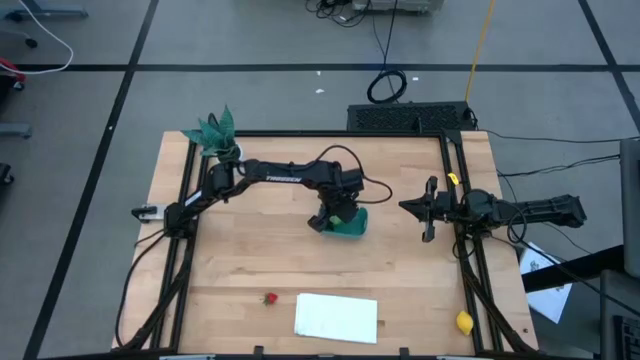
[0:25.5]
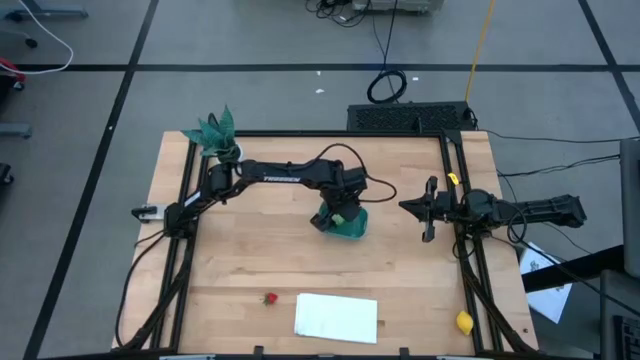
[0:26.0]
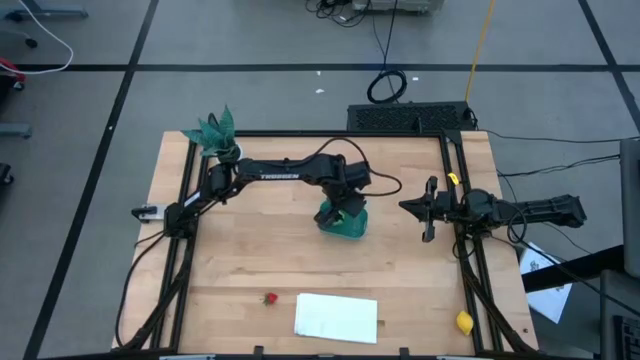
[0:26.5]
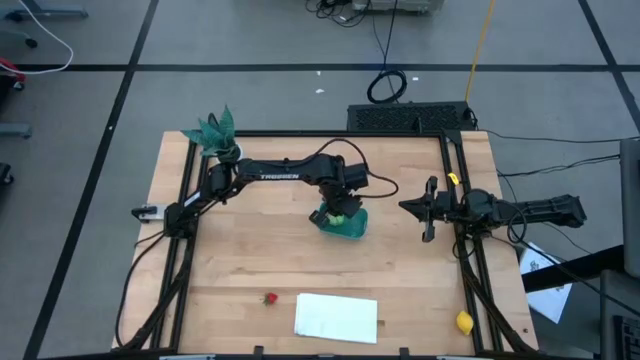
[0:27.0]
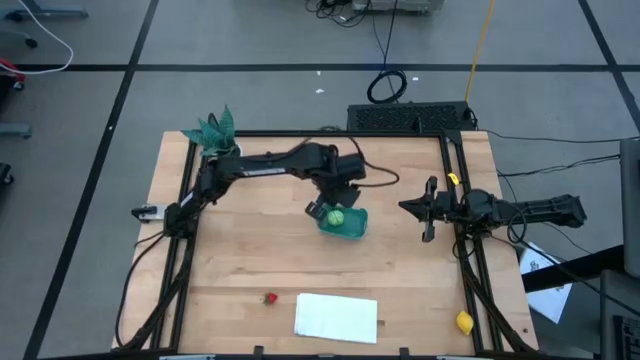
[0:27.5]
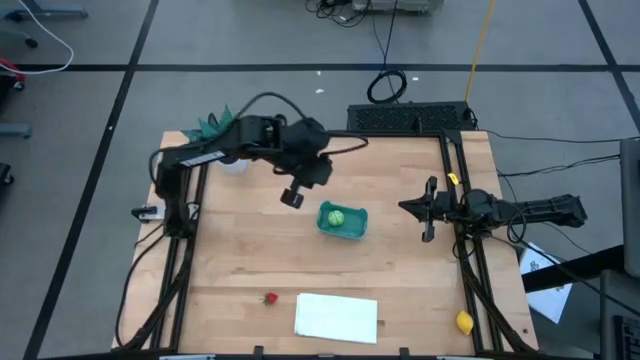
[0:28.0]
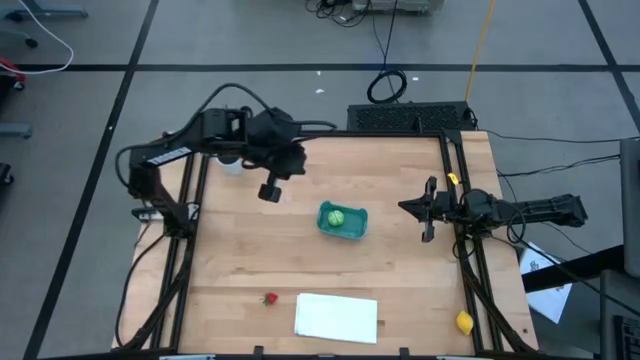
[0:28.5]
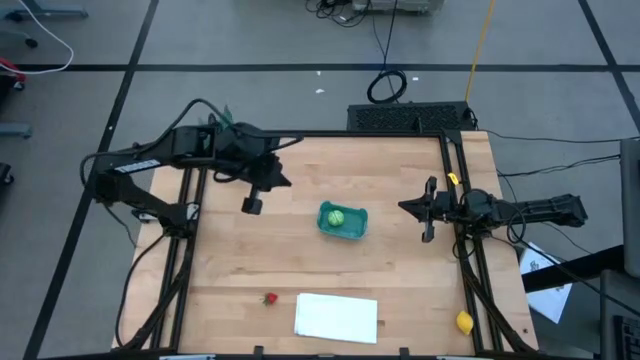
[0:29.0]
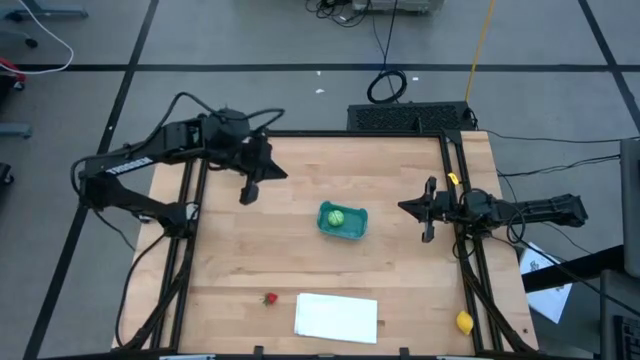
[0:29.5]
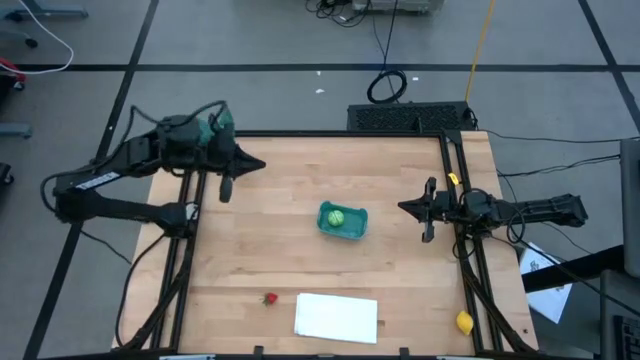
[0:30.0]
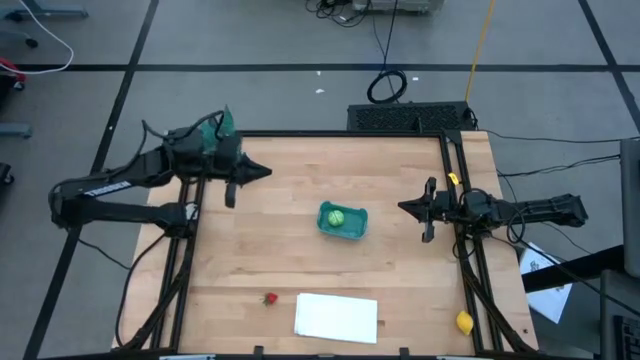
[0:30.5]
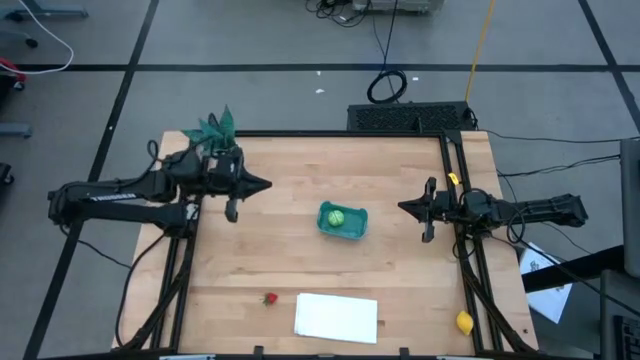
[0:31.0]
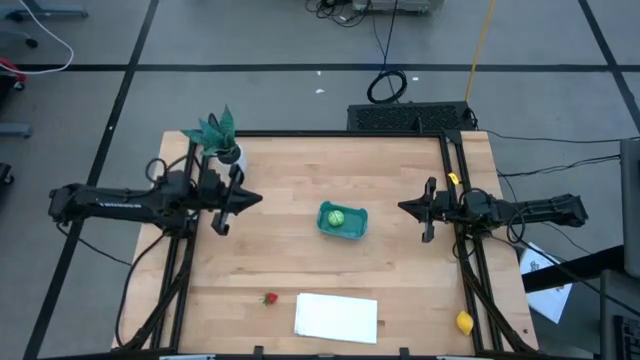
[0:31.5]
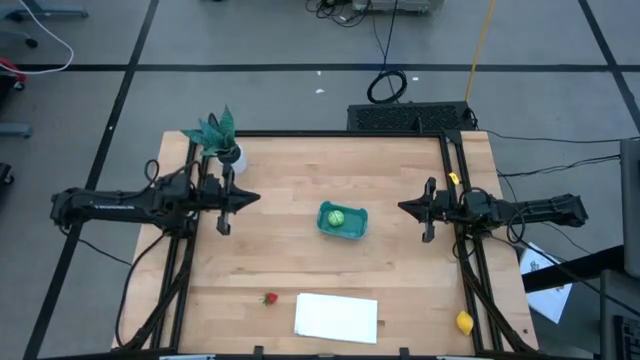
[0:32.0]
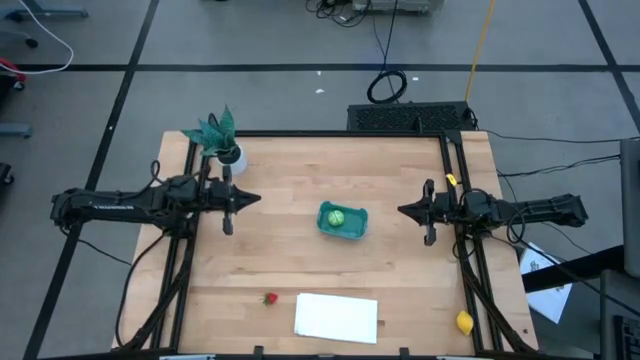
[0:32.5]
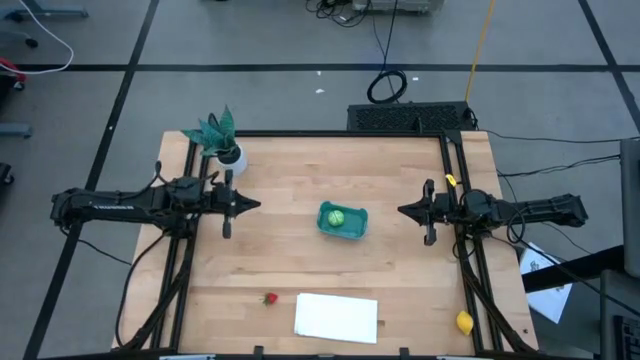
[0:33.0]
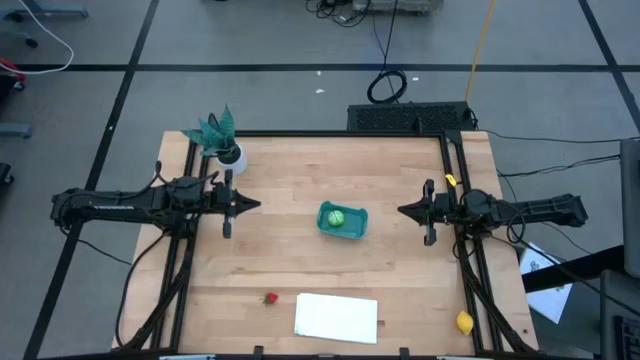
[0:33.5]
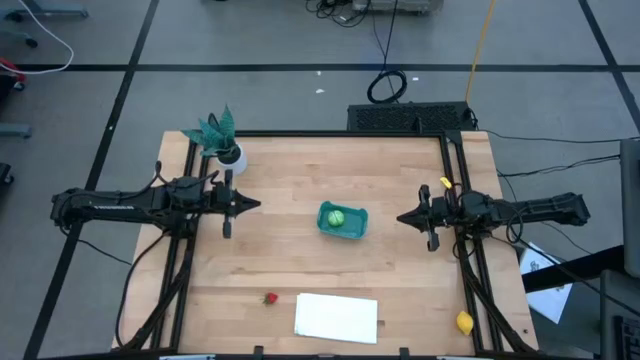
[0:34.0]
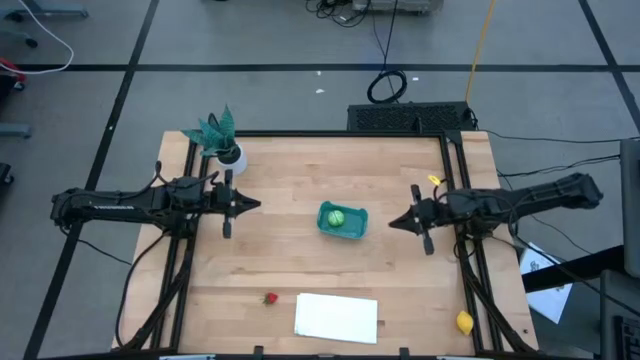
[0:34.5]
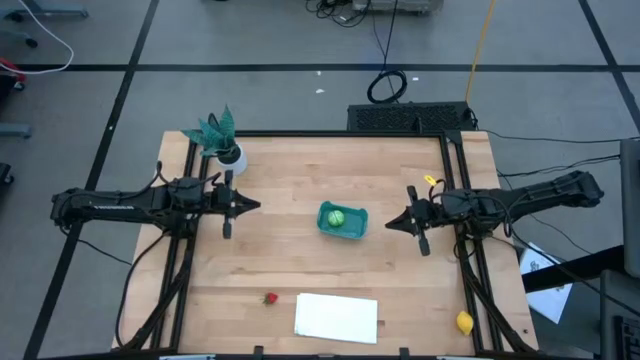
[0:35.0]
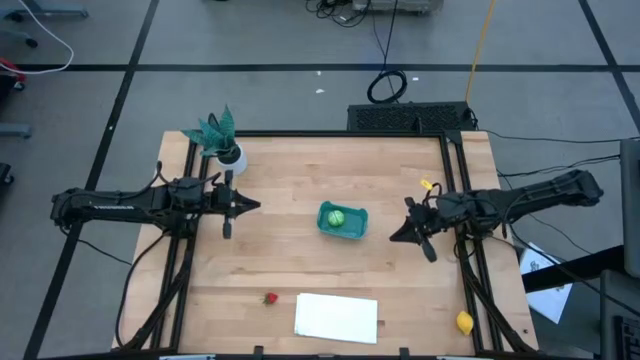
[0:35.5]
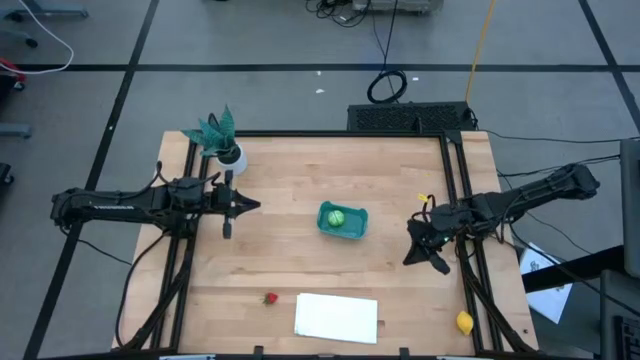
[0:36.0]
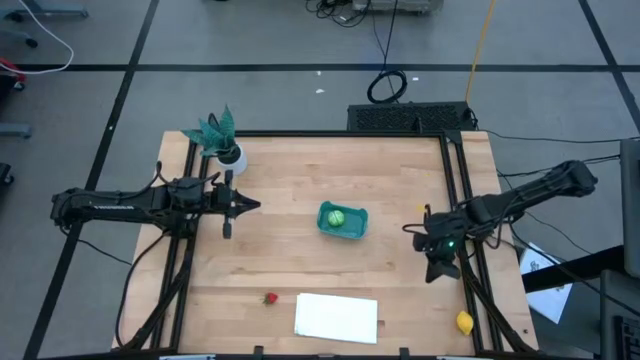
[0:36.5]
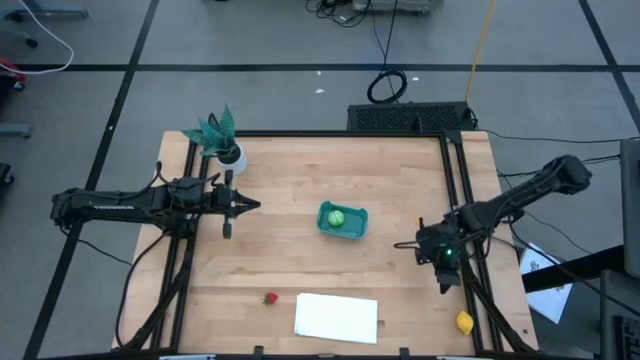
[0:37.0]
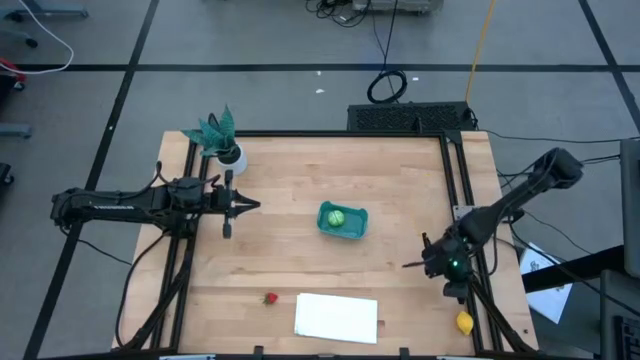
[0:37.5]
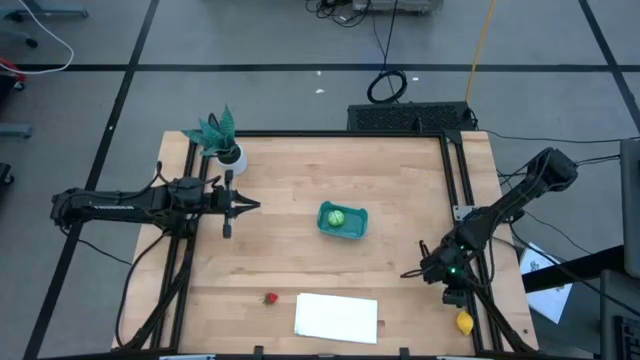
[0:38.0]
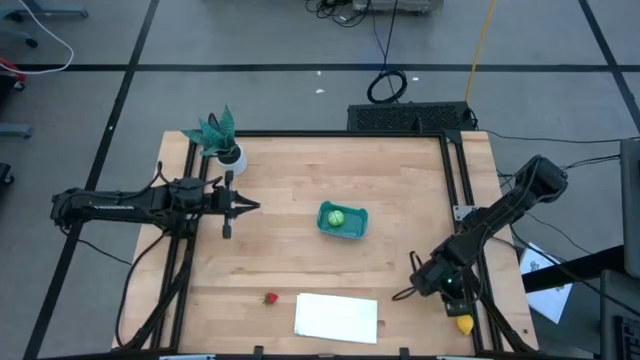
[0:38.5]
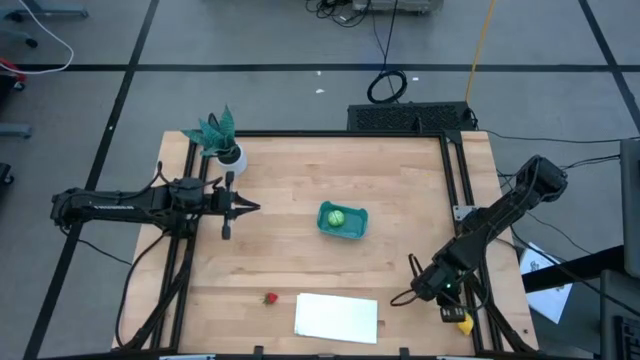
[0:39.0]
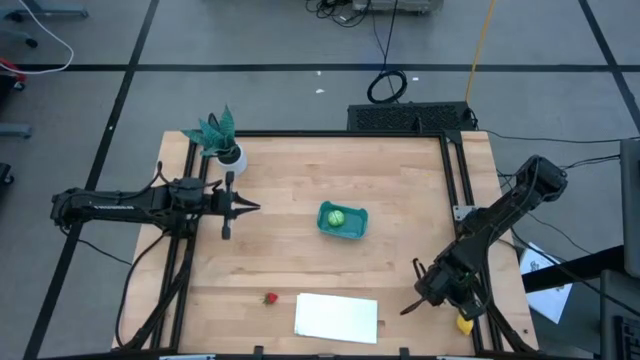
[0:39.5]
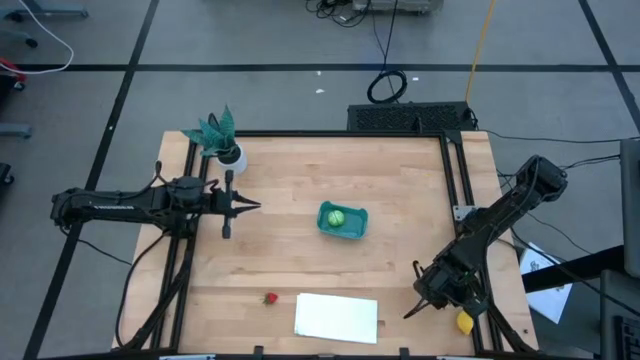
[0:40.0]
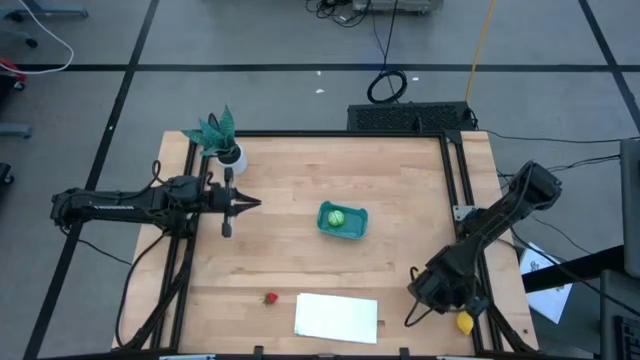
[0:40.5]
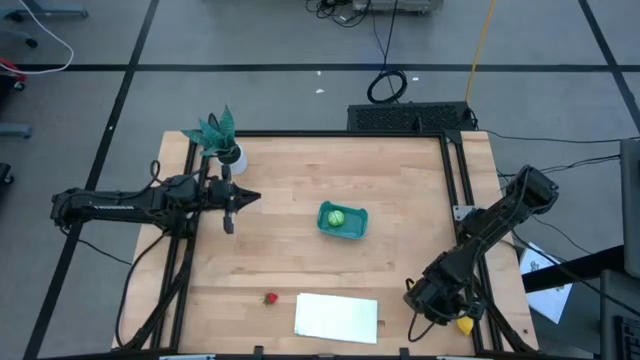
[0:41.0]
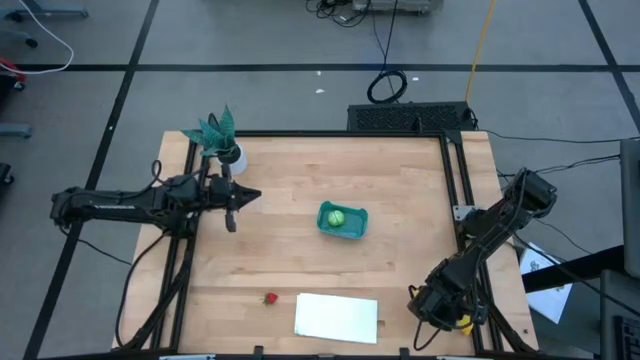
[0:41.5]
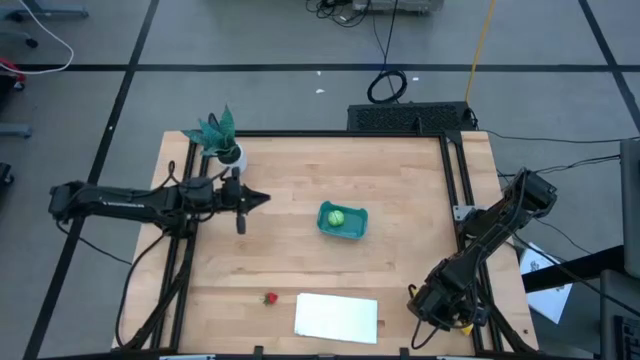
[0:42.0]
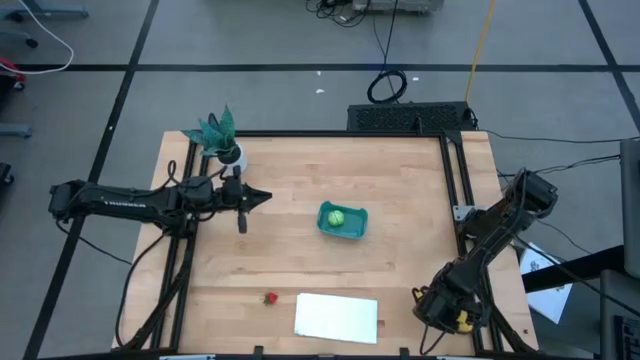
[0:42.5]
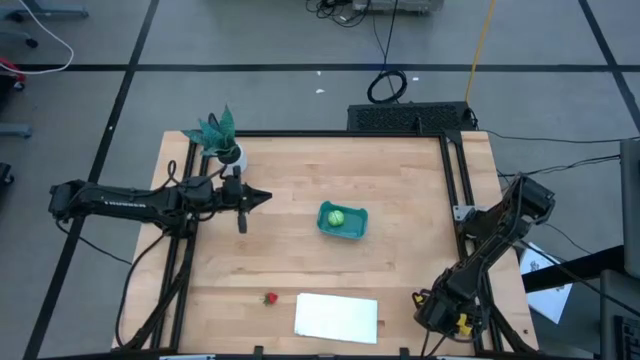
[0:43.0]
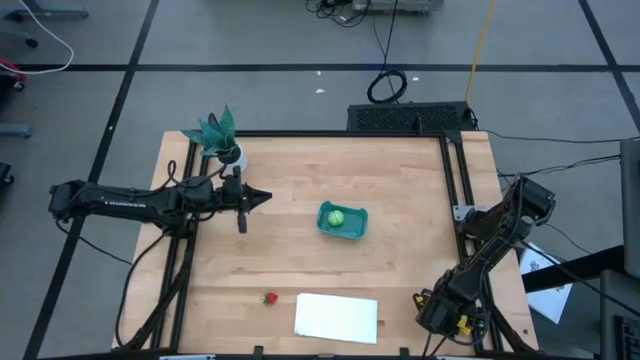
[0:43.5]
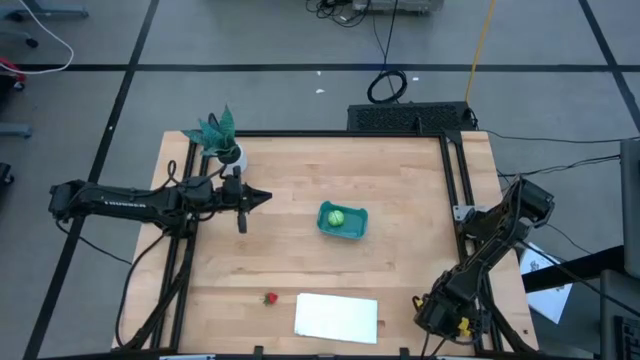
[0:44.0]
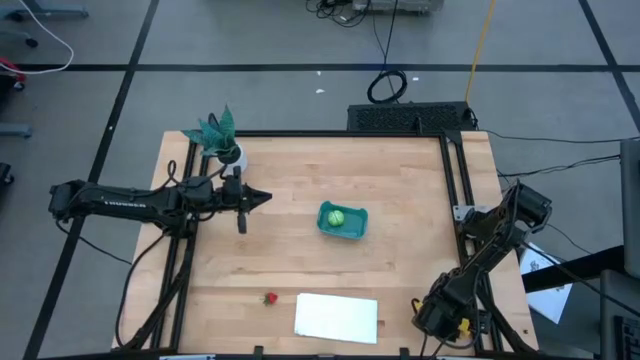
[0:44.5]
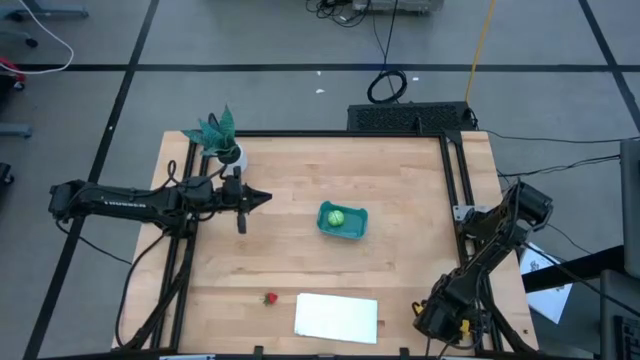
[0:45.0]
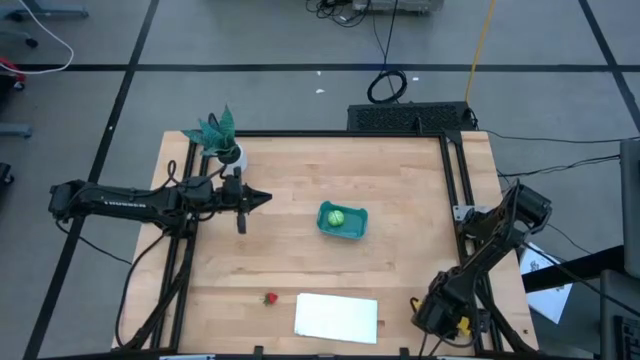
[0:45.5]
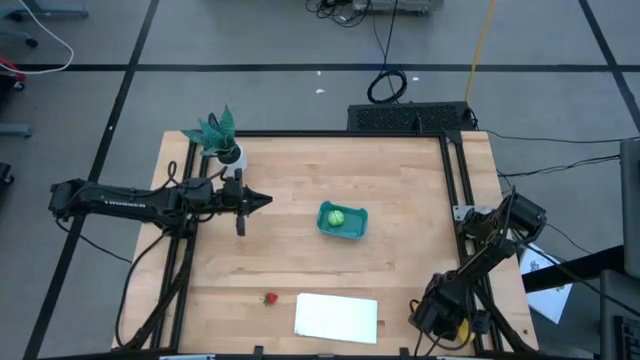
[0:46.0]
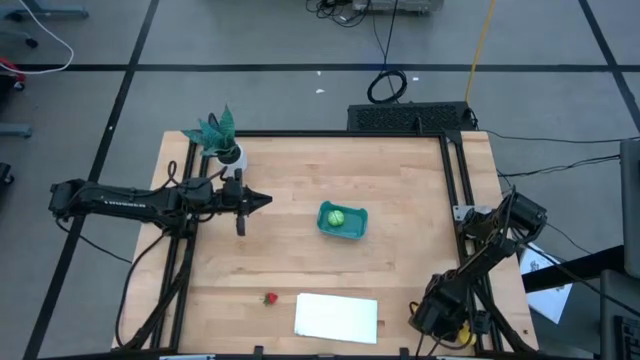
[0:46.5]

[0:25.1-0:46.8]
Task: Pick and placing Produce into tupperware
Put the lemon into the bin
